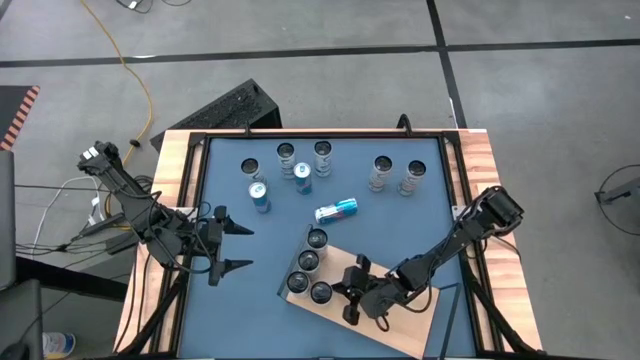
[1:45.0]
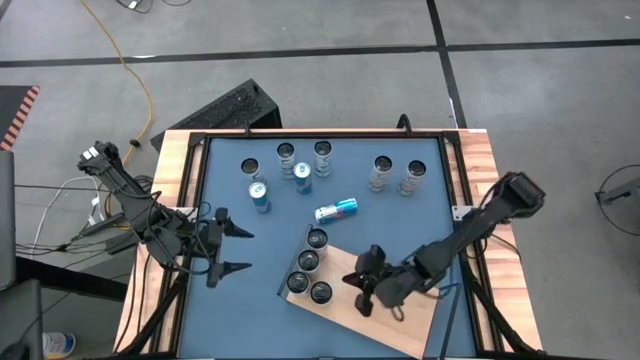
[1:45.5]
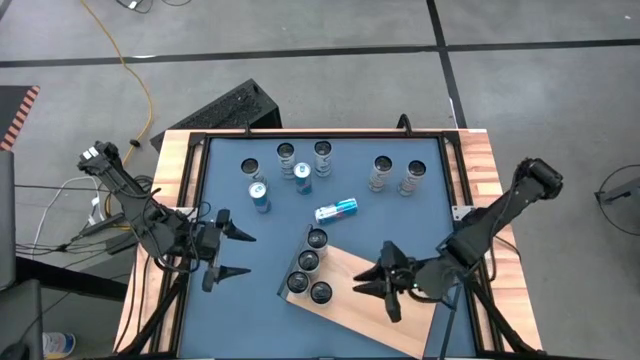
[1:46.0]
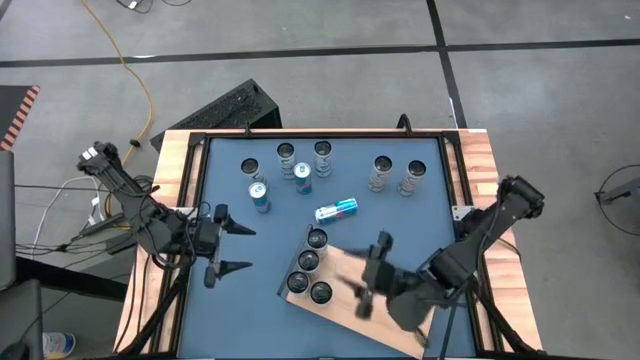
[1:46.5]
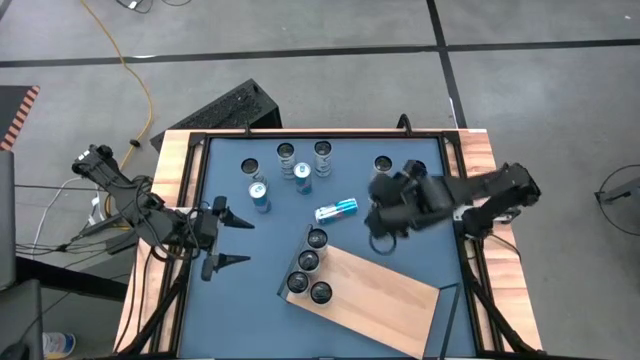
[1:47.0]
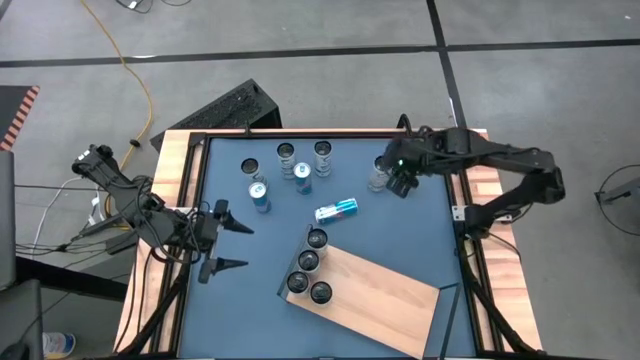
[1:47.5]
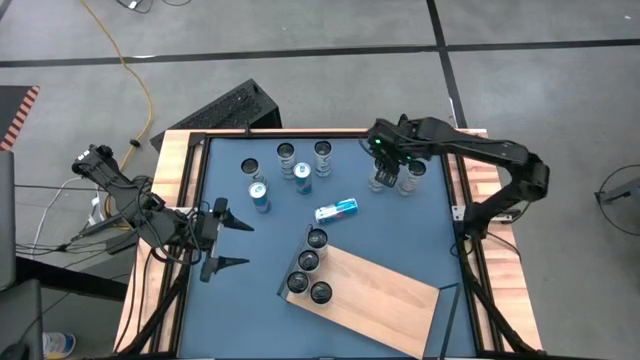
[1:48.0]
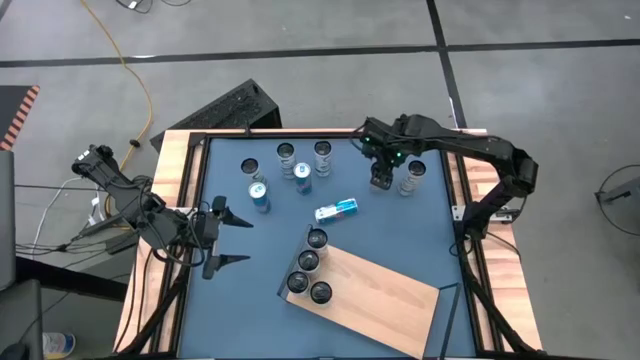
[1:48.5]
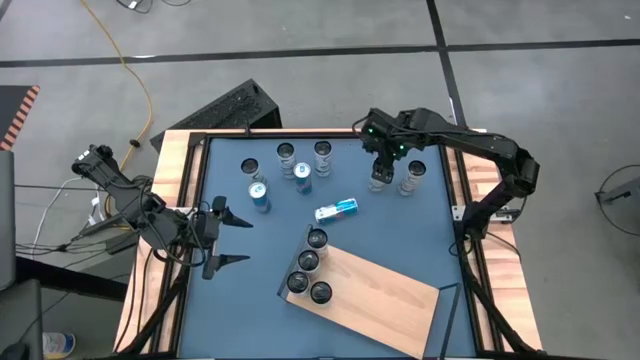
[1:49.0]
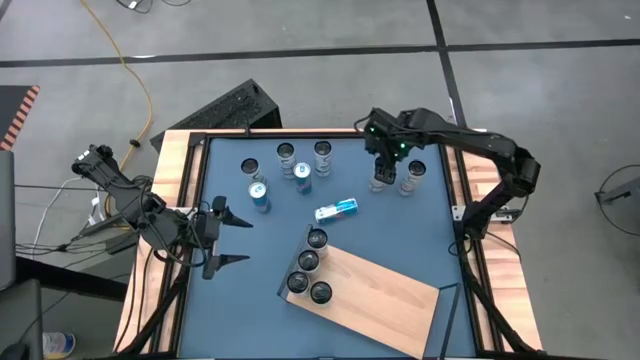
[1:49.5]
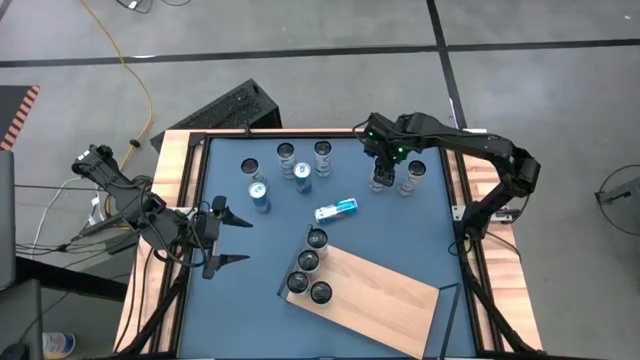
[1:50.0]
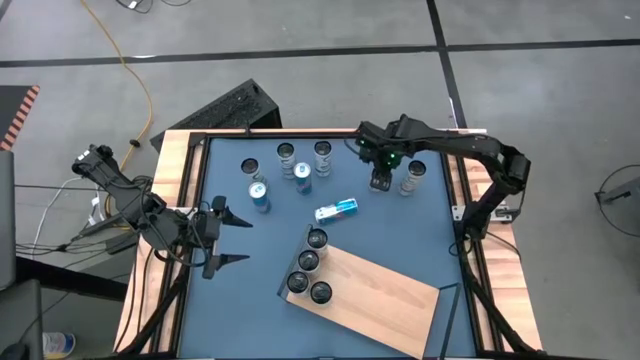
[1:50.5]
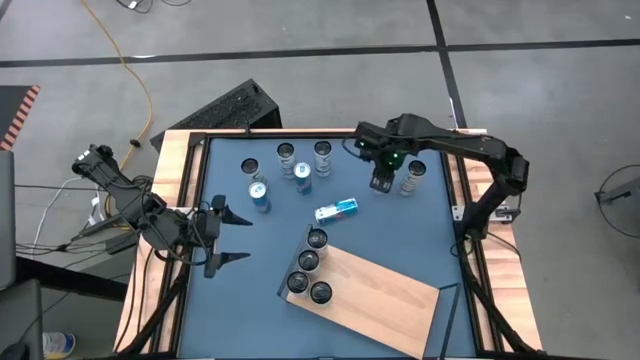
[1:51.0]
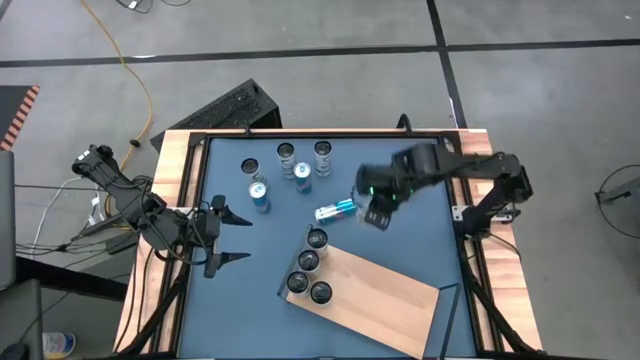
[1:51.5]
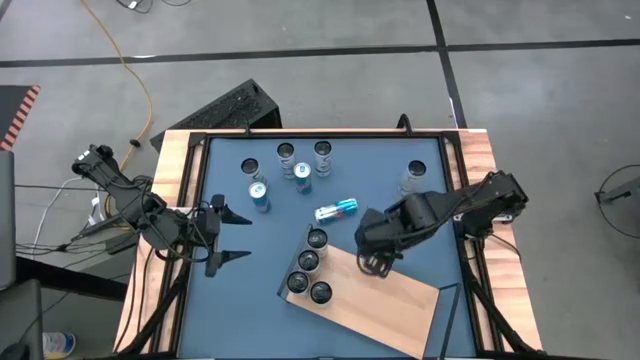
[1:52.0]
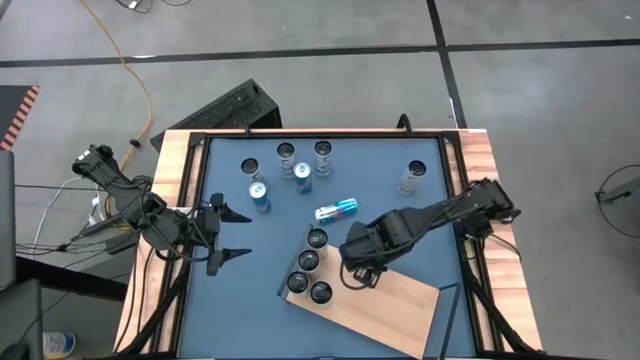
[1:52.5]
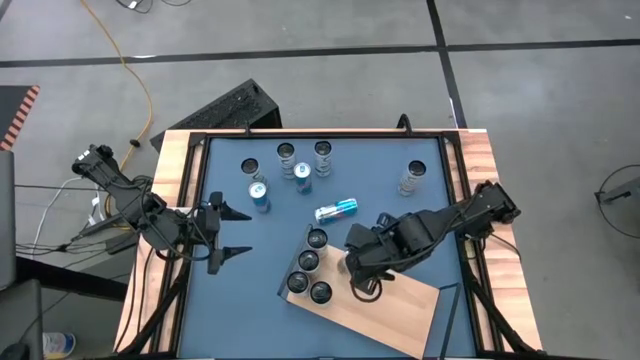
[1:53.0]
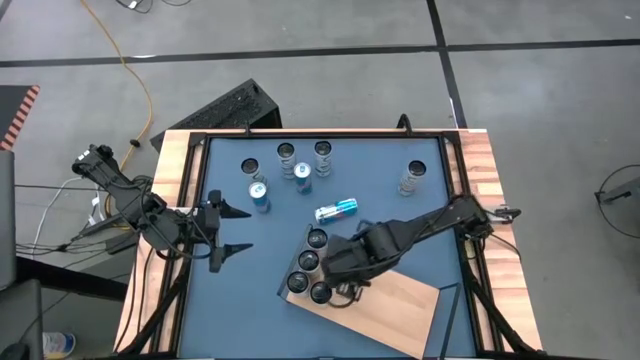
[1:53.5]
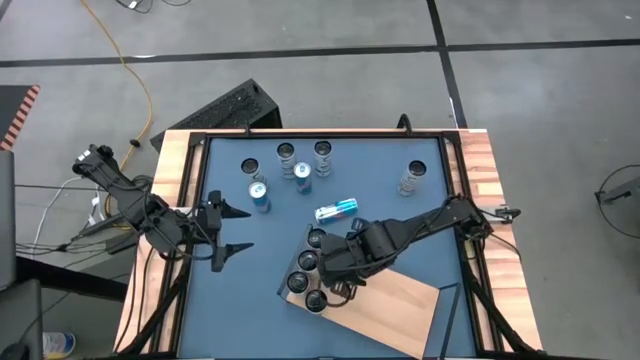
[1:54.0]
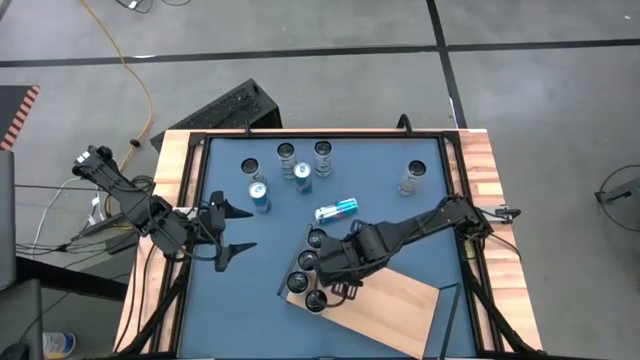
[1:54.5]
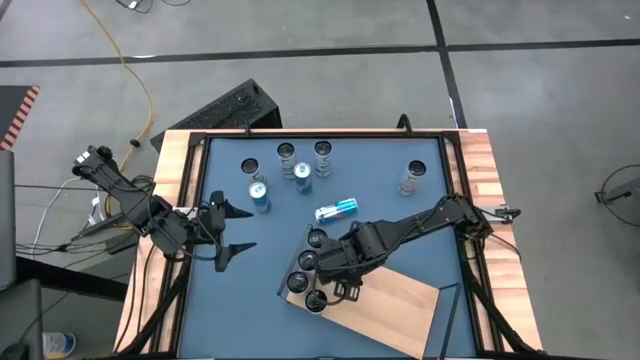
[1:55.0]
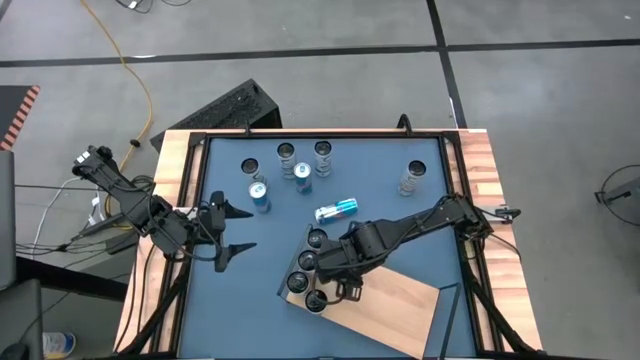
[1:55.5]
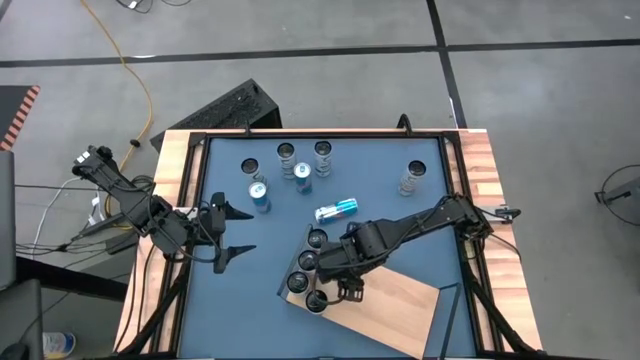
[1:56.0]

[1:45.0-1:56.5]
Task: Place canned beverage on shelf
Put the left white yellow soda can aligned with the other white yellow soda can on the shelf

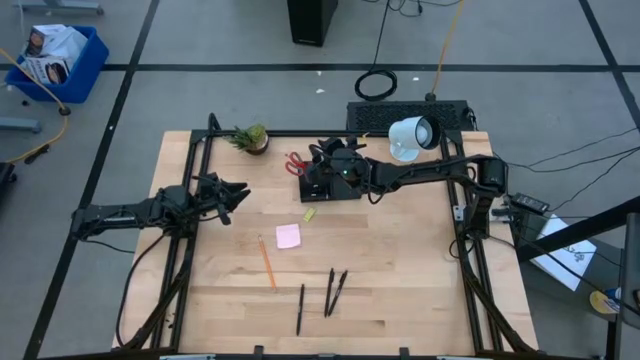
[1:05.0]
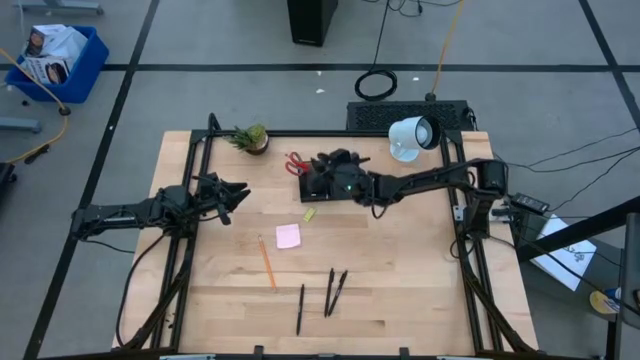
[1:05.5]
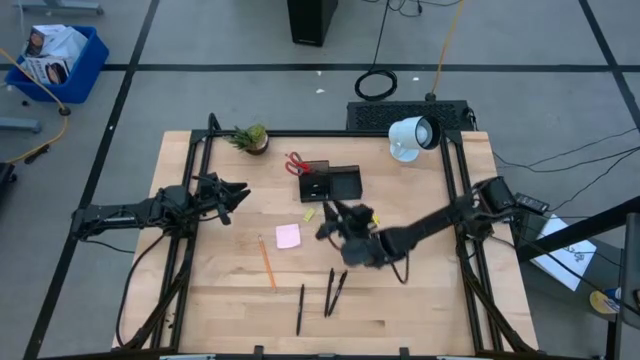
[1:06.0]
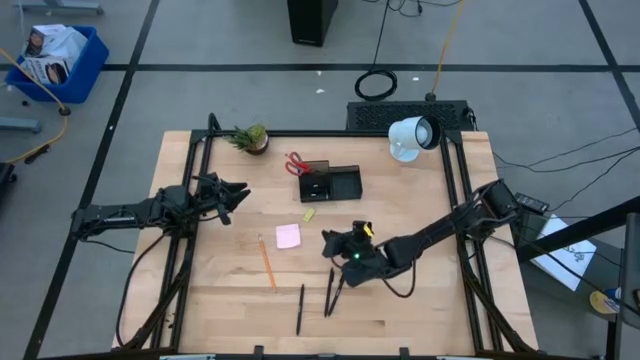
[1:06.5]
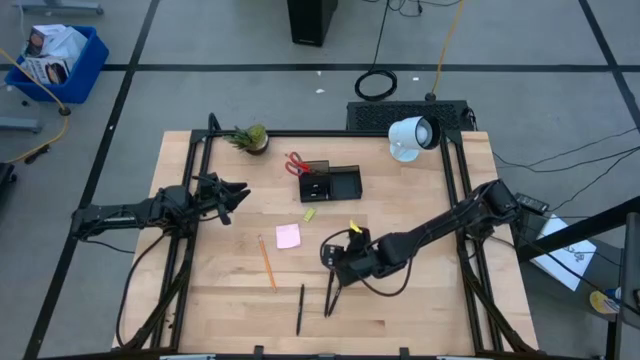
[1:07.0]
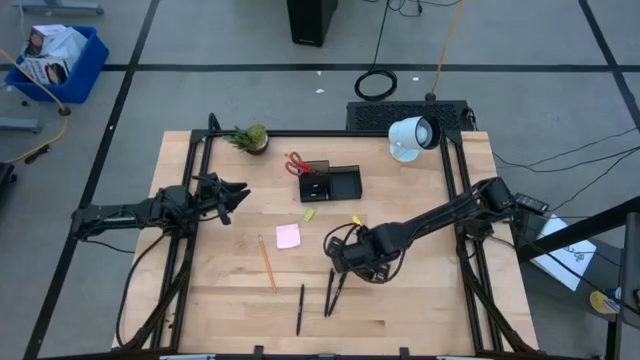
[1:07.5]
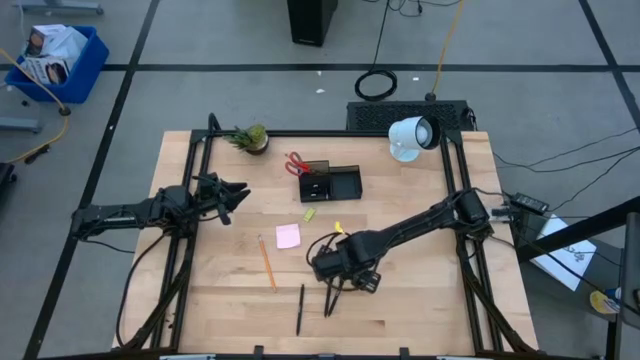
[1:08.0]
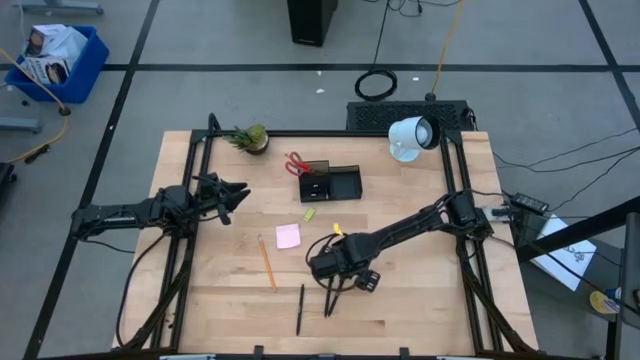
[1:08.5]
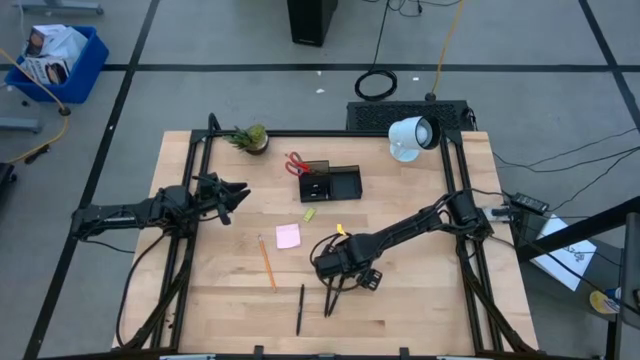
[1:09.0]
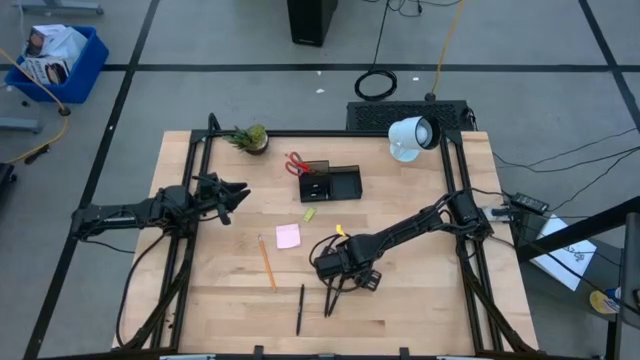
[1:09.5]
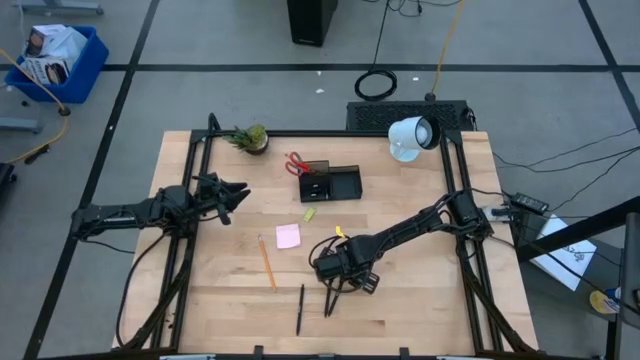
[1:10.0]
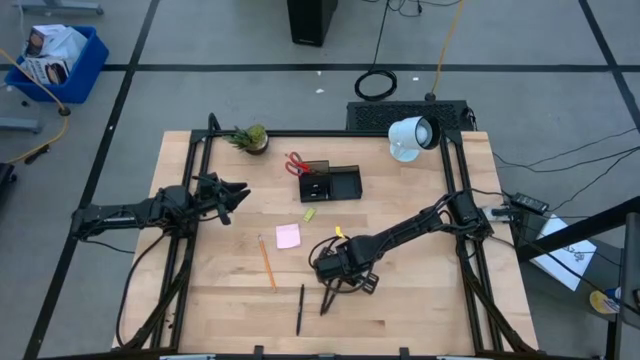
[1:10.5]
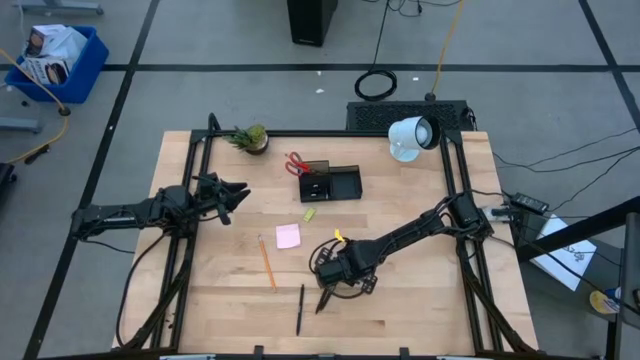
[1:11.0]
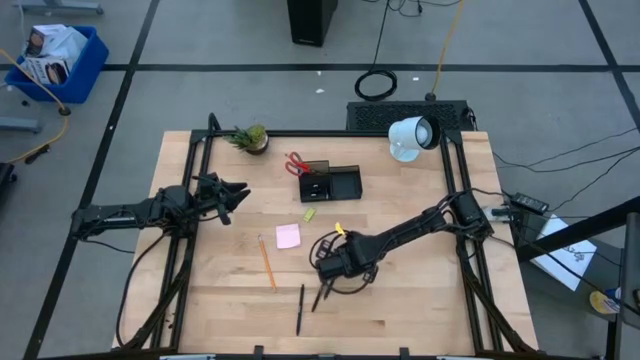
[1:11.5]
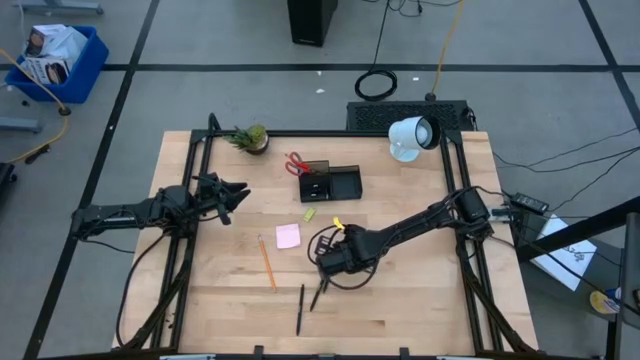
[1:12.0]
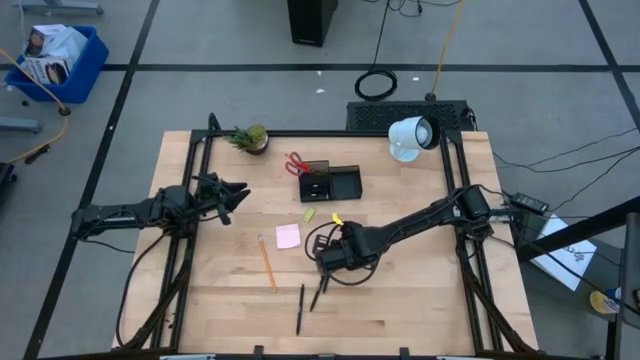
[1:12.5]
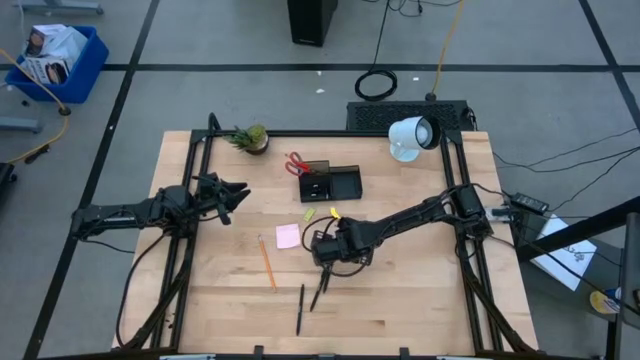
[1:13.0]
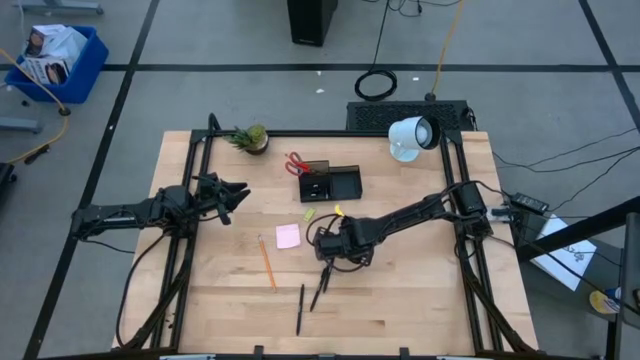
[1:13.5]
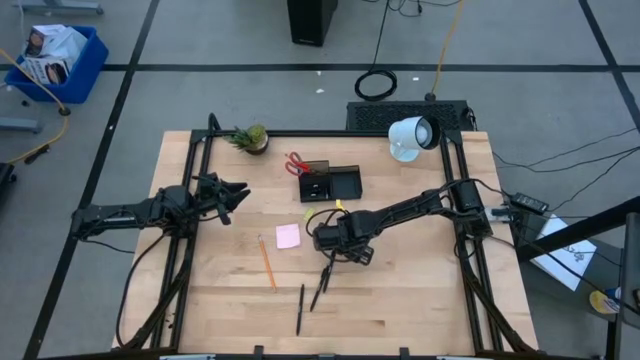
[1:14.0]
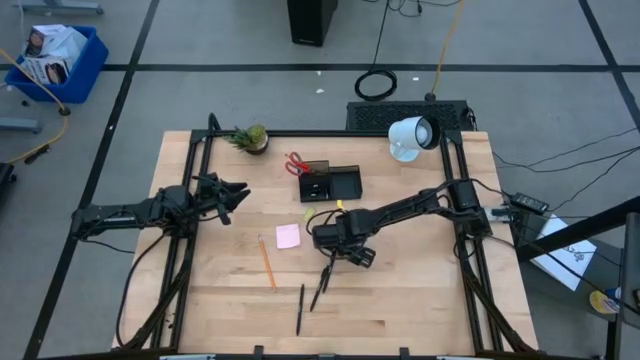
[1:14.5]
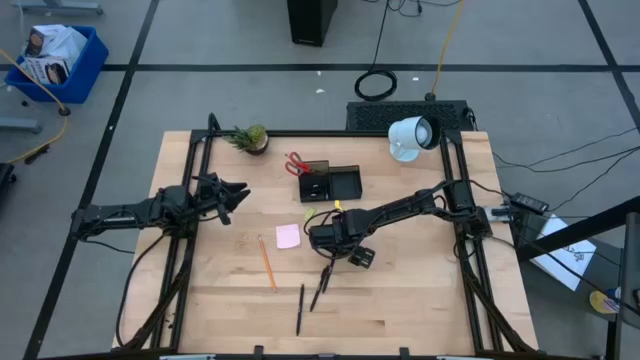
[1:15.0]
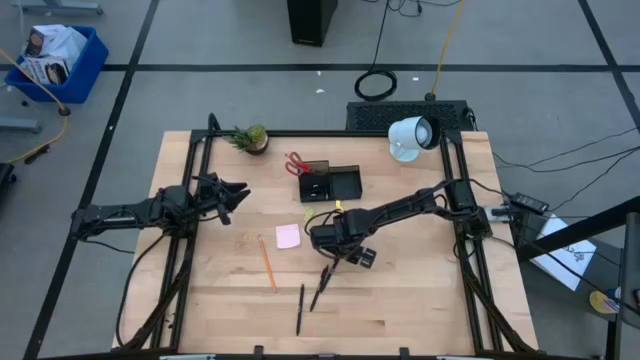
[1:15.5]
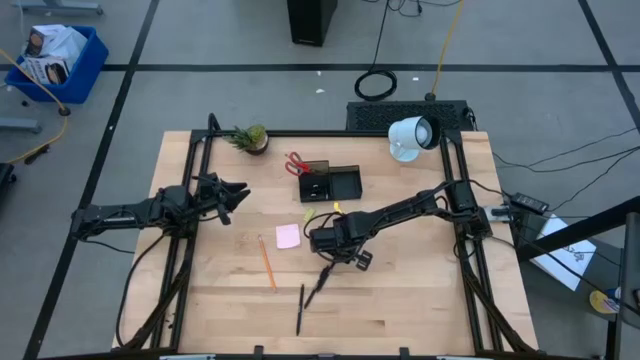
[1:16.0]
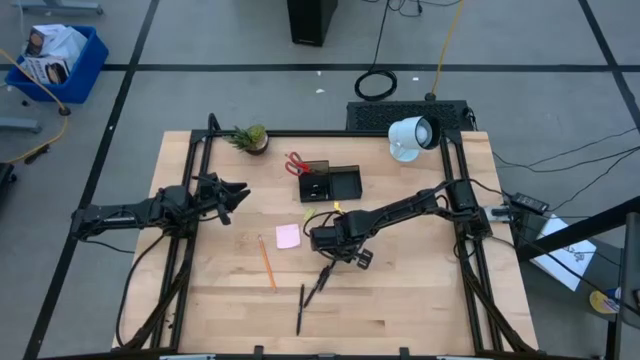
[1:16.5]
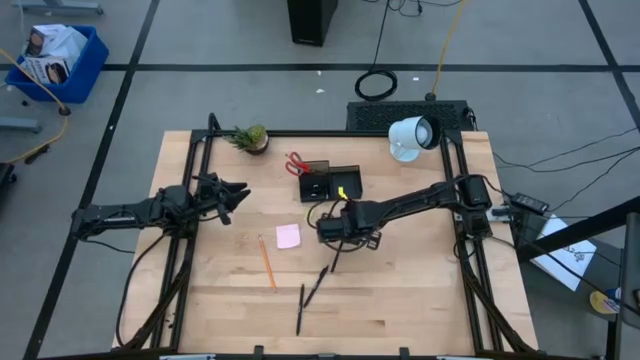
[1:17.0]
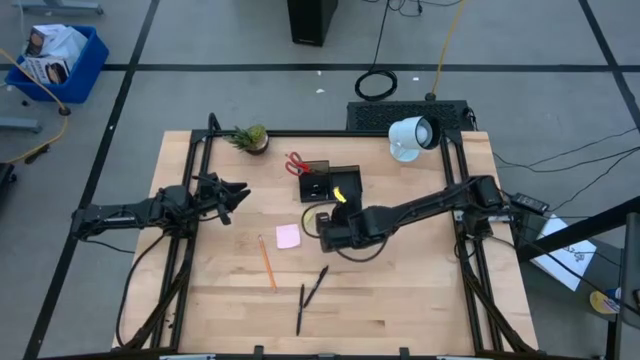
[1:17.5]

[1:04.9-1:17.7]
Task: Pick and place office supplies into organizer
Put the right pen into the mesh organizer
